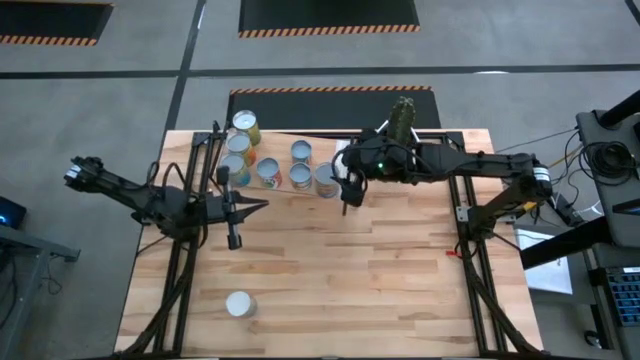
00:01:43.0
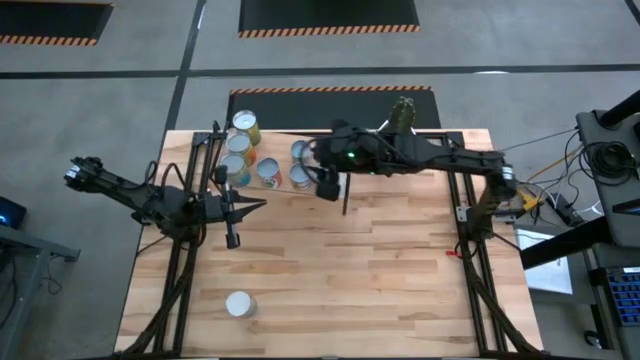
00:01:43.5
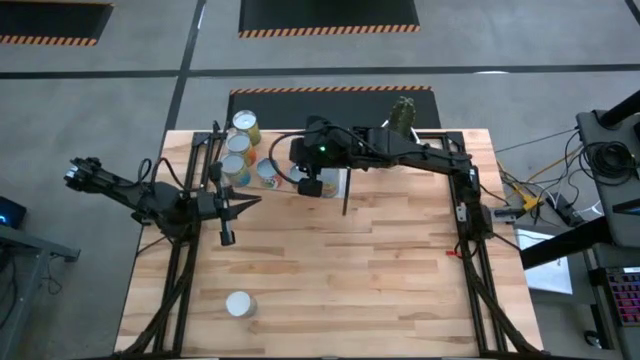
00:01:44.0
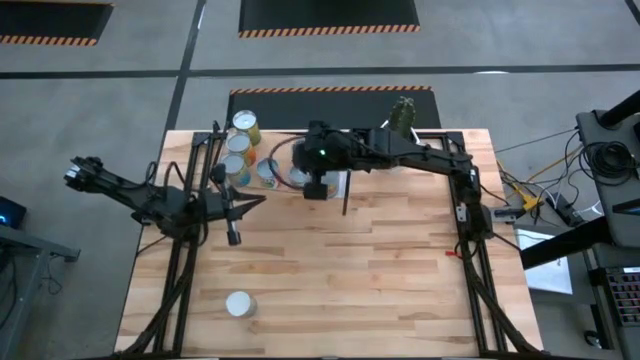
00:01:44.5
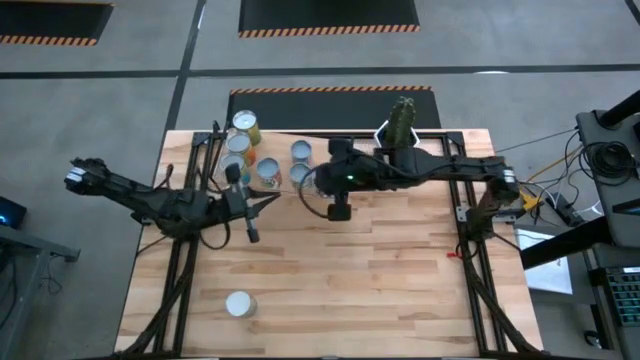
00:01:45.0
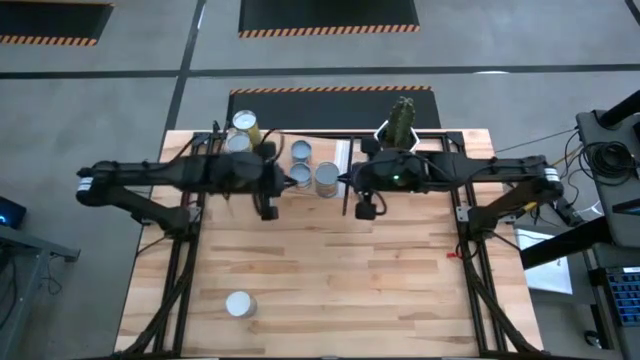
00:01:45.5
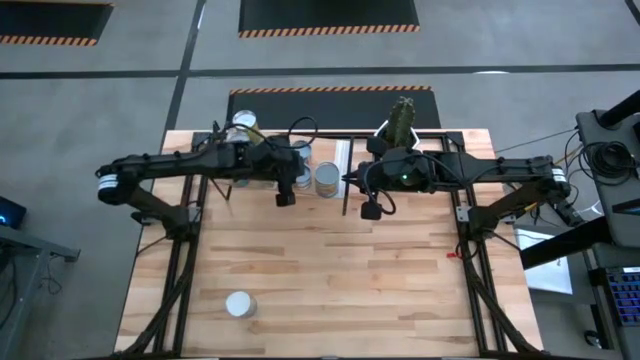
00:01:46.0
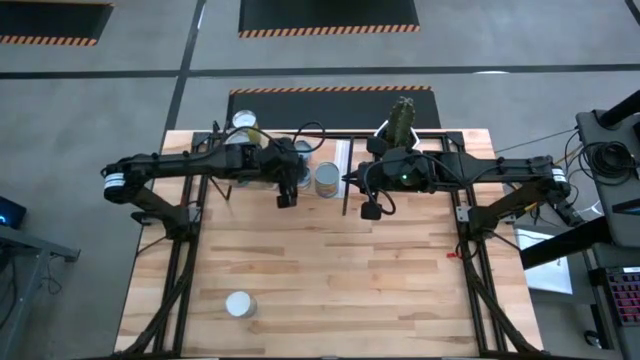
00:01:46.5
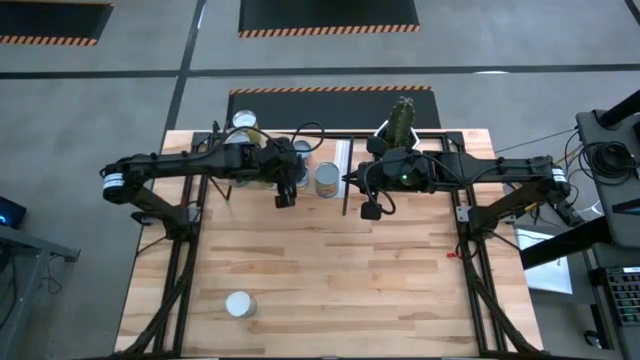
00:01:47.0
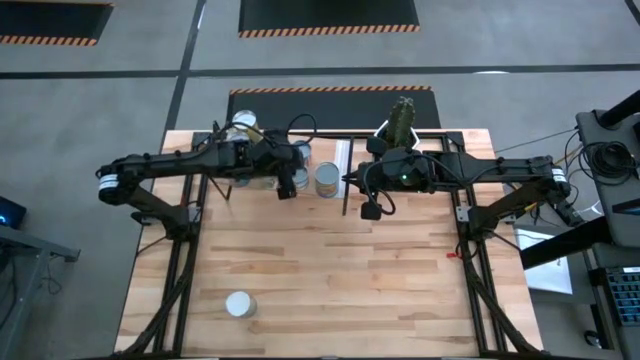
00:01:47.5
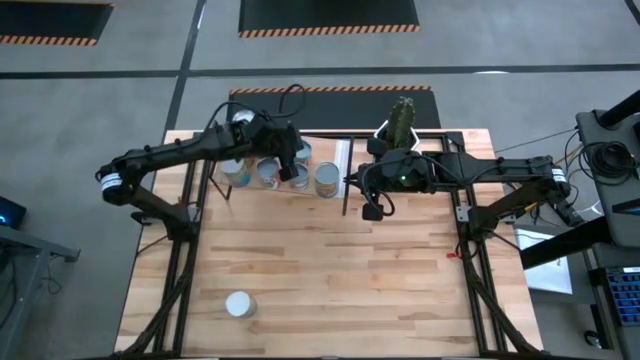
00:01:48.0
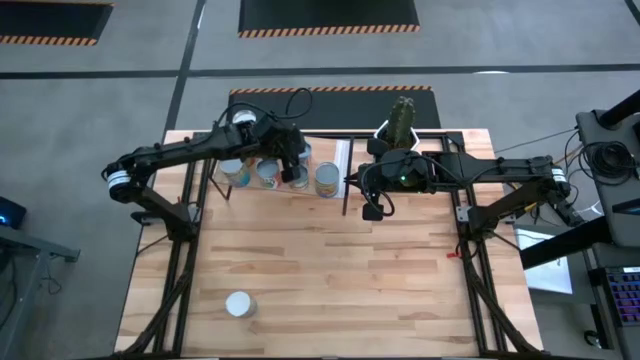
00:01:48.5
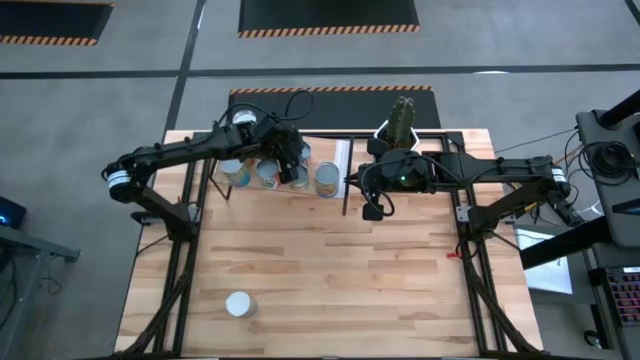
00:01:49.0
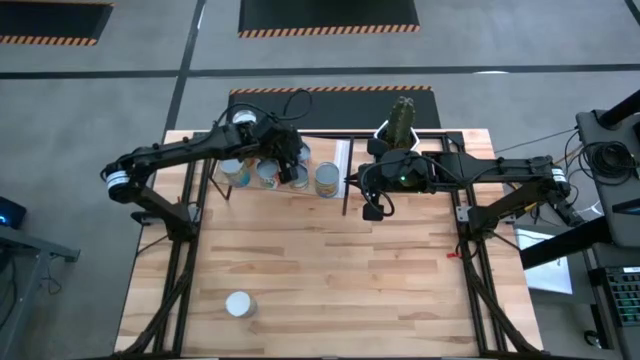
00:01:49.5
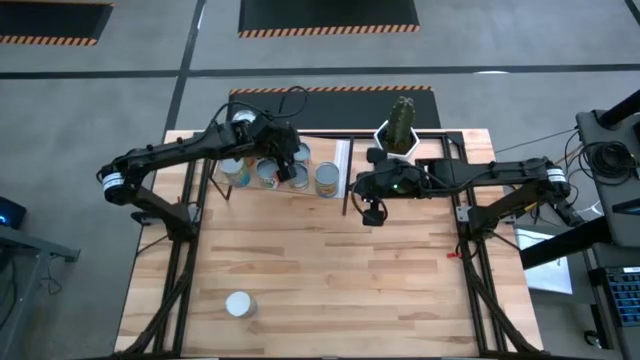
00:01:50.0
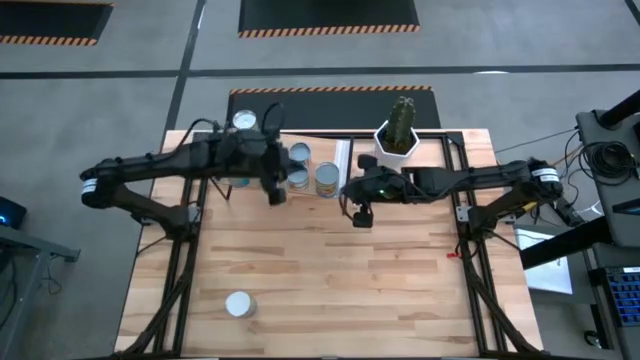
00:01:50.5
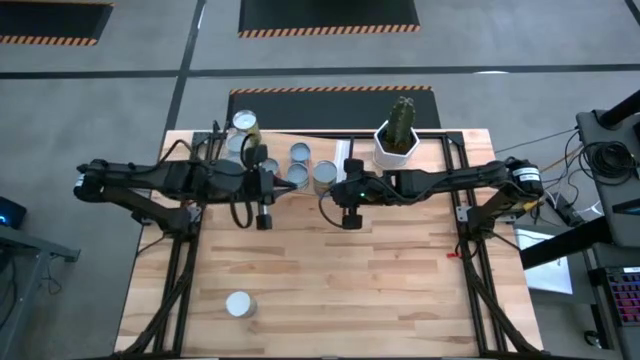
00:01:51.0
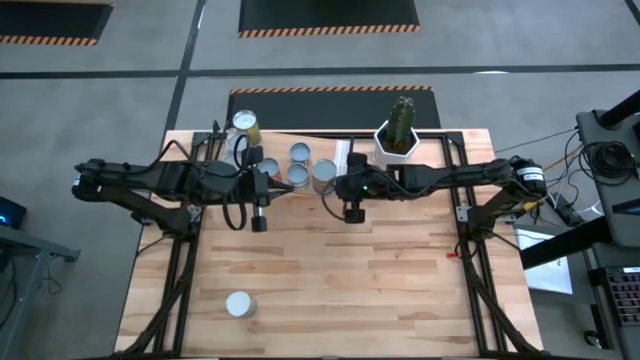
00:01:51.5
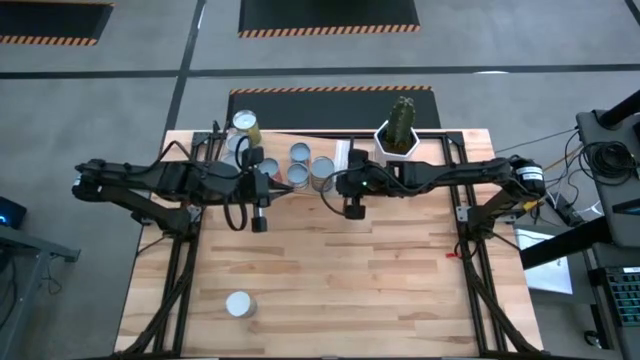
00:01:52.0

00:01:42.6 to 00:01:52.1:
Task: Pick and place cans onto a shelf
Adjust the cans on the shelf

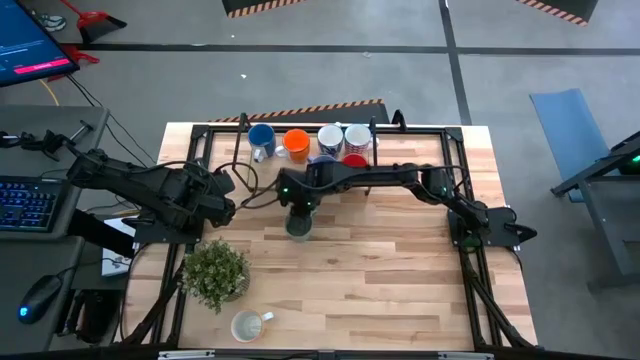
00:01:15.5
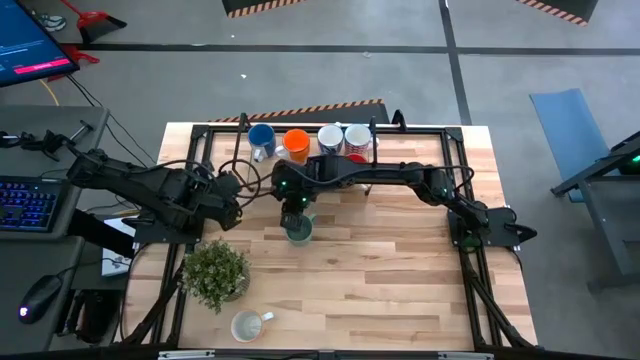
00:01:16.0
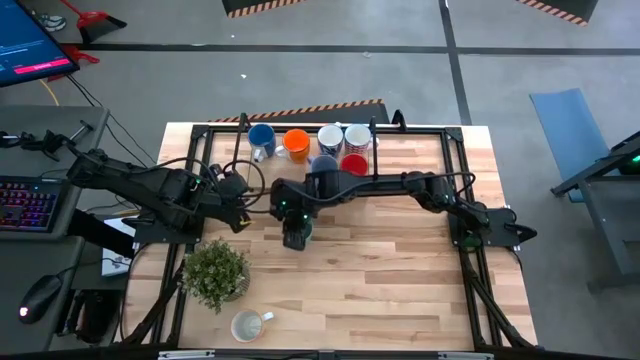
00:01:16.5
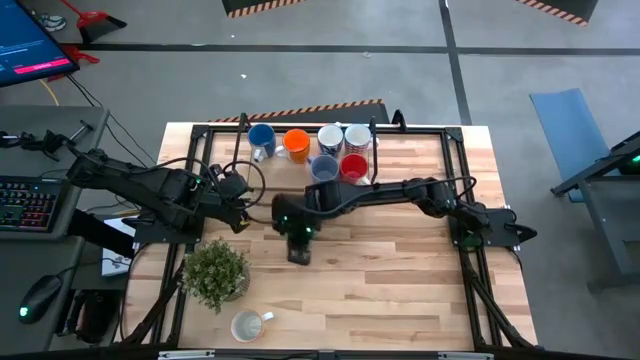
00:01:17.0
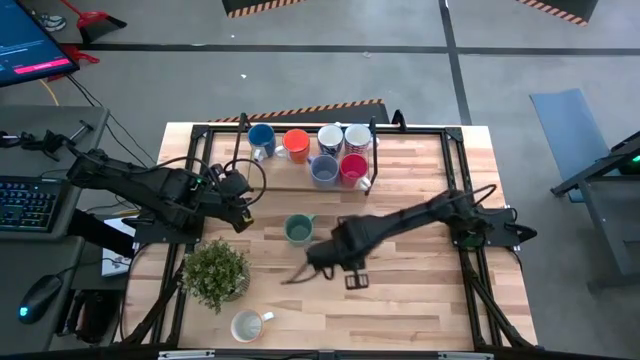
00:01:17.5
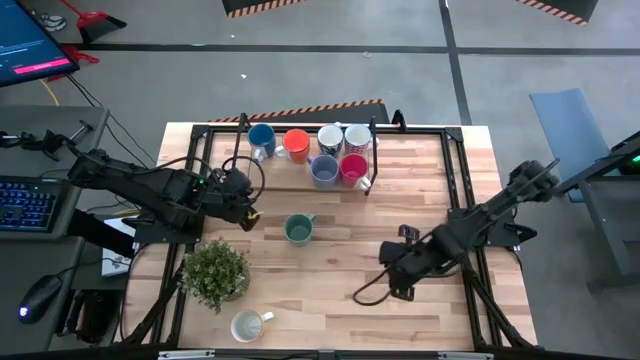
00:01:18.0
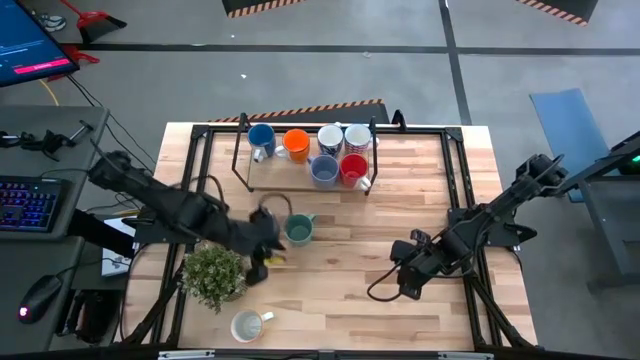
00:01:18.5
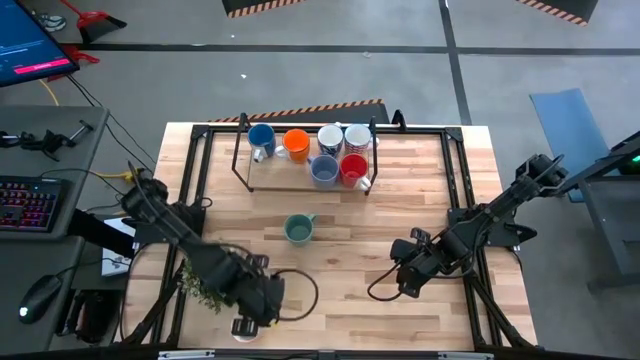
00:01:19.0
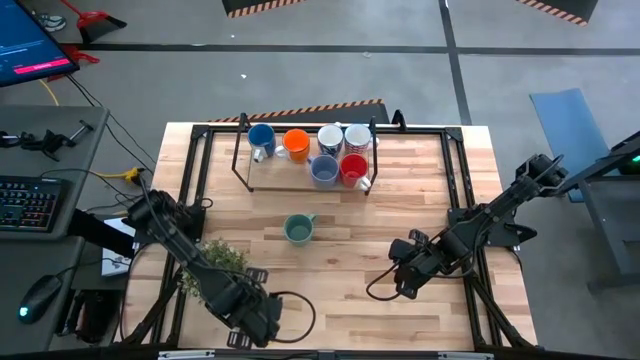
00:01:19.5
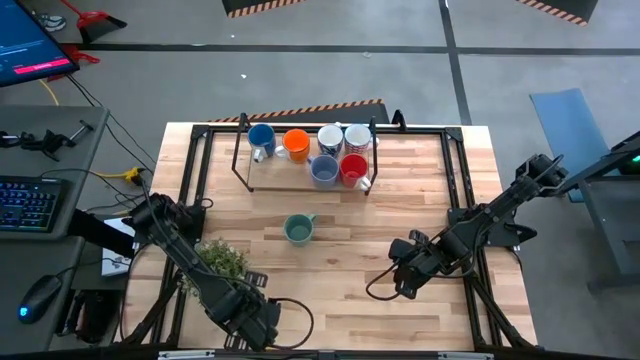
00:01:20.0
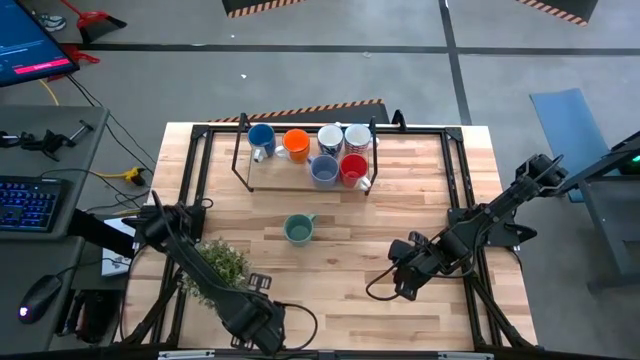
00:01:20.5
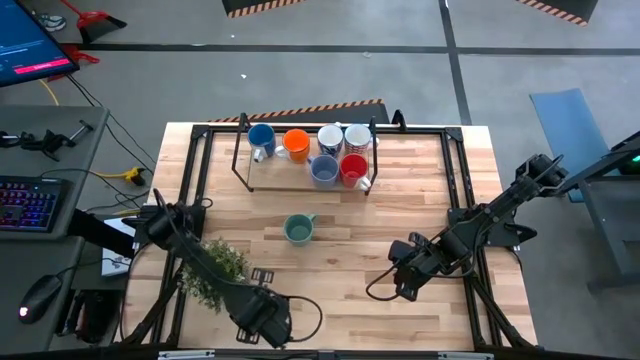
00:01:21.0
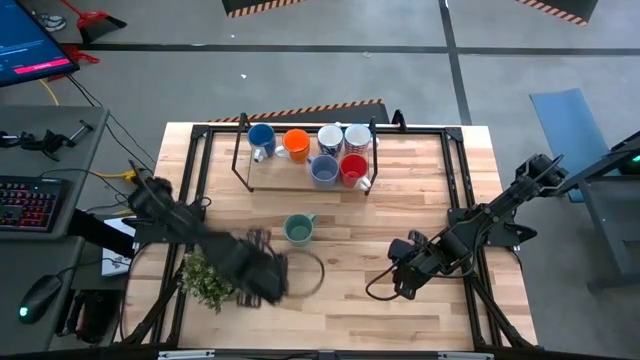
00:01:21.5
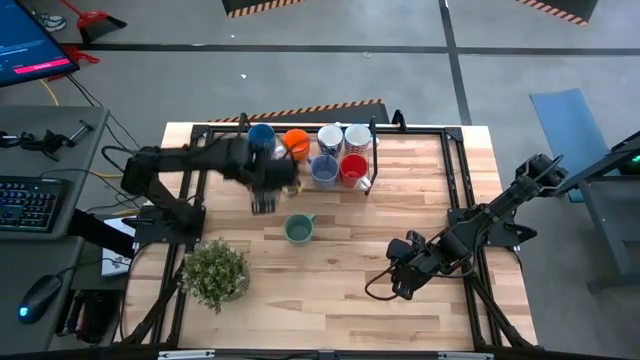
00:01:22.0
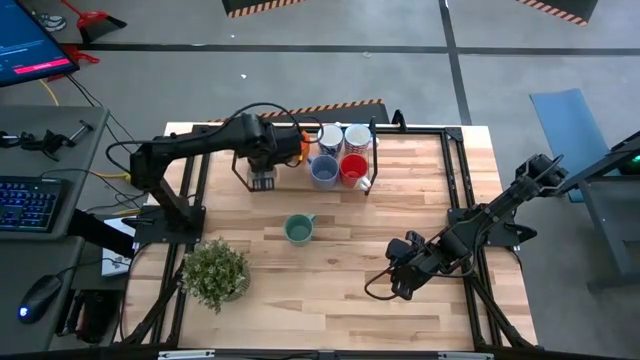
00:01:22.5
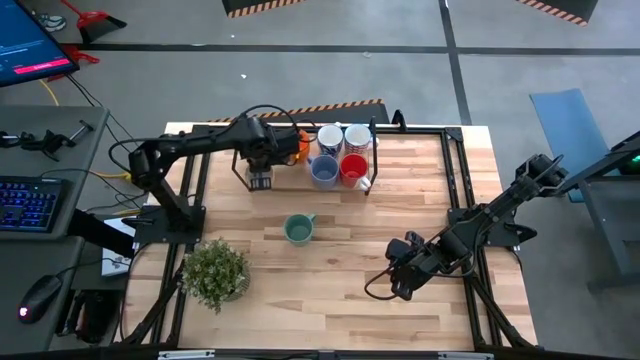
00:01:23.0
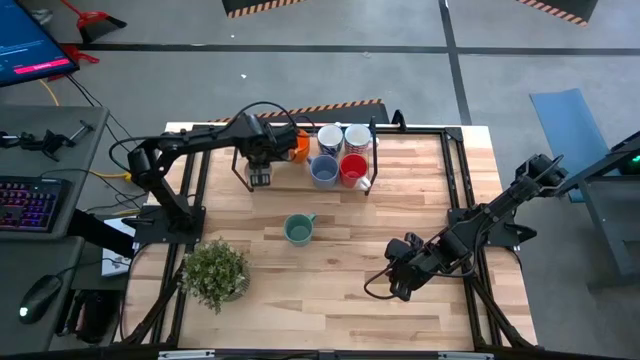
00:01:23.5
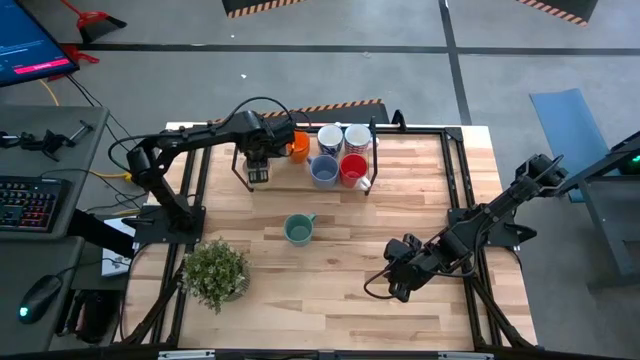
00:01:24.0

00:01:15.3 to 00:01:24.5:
Task: Place coffee mugs
Put the yellow pattern mug on the shelf
